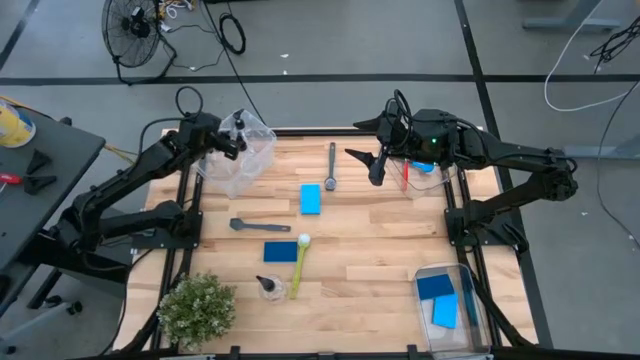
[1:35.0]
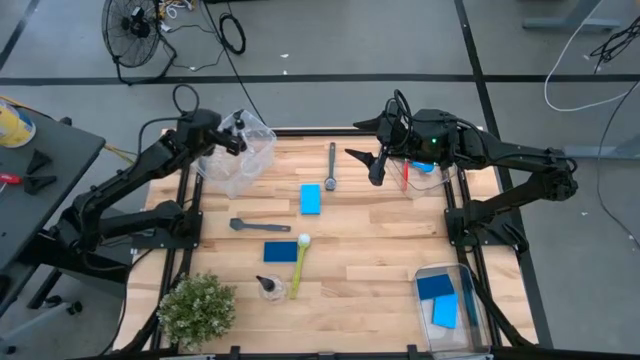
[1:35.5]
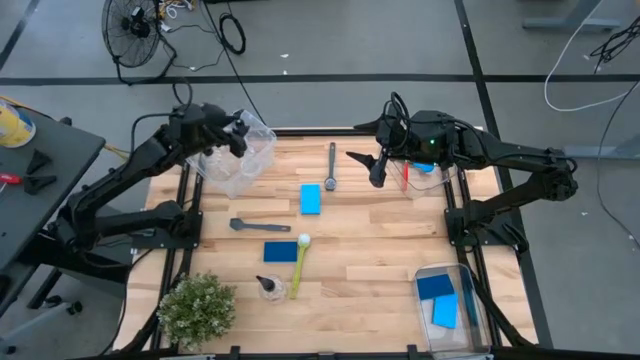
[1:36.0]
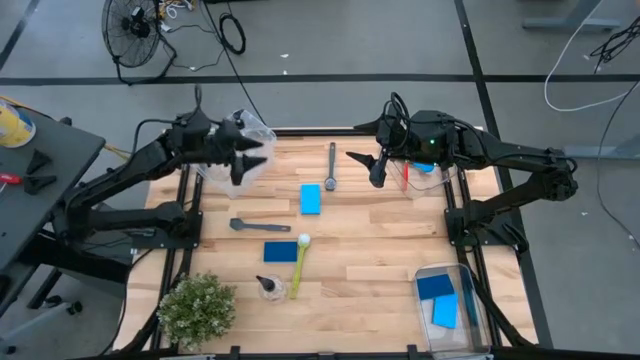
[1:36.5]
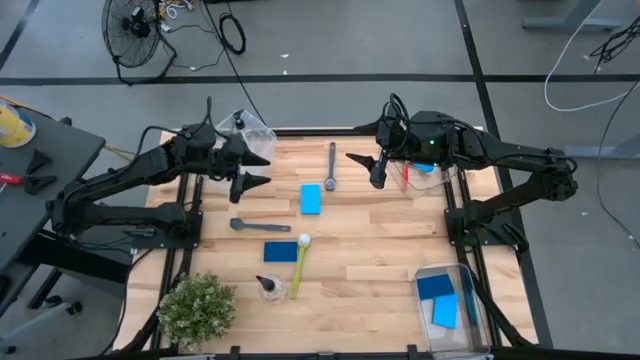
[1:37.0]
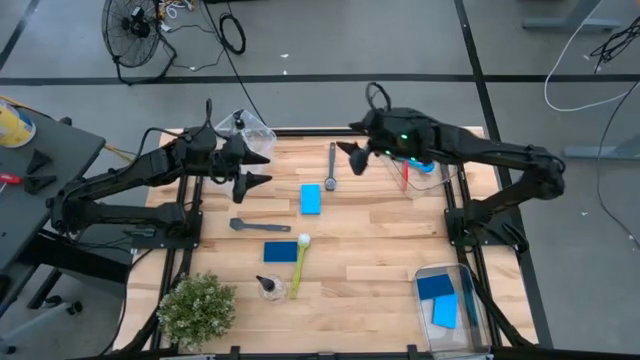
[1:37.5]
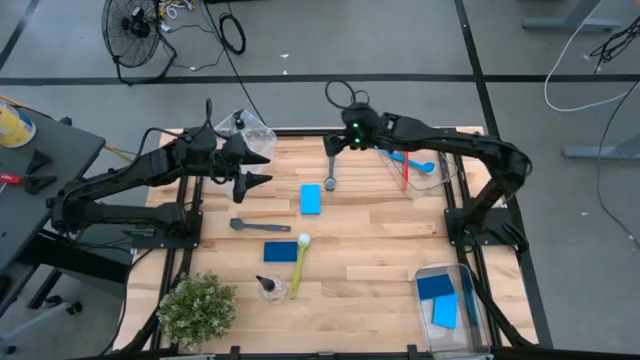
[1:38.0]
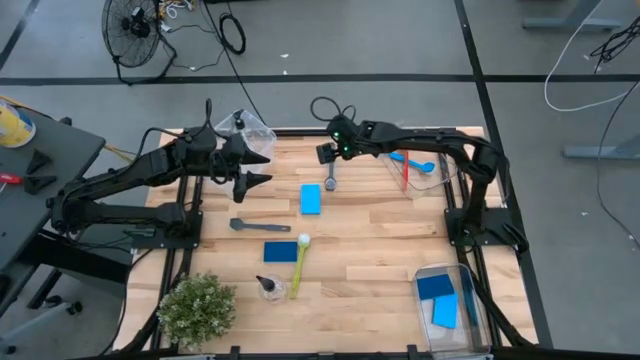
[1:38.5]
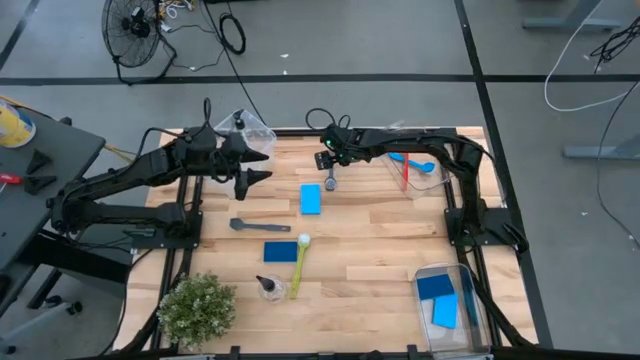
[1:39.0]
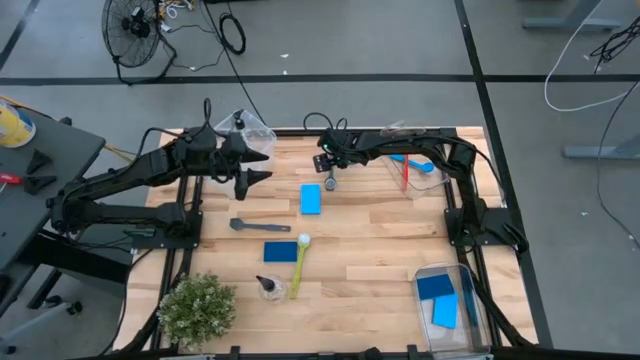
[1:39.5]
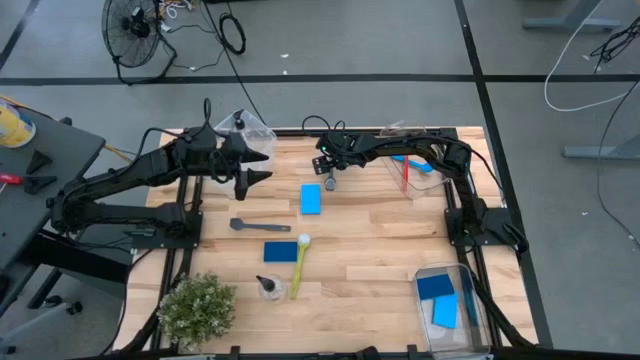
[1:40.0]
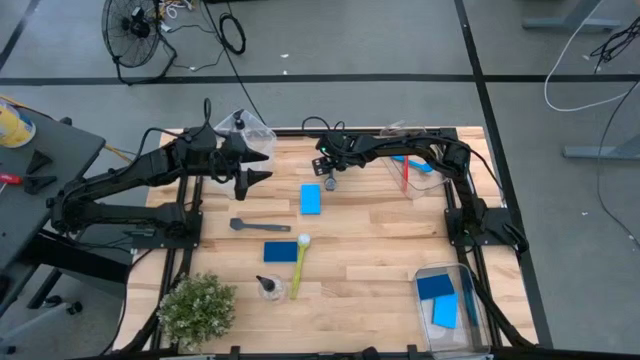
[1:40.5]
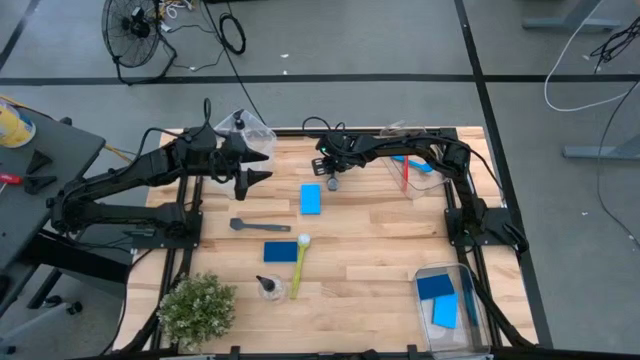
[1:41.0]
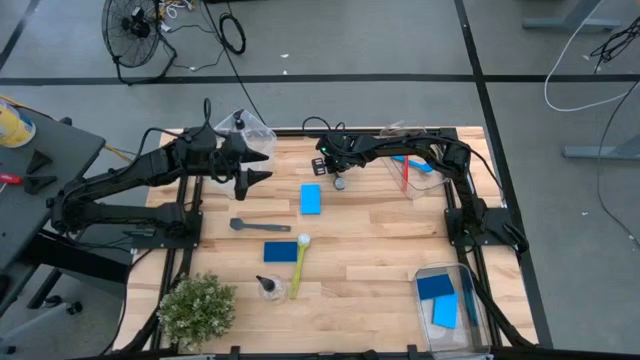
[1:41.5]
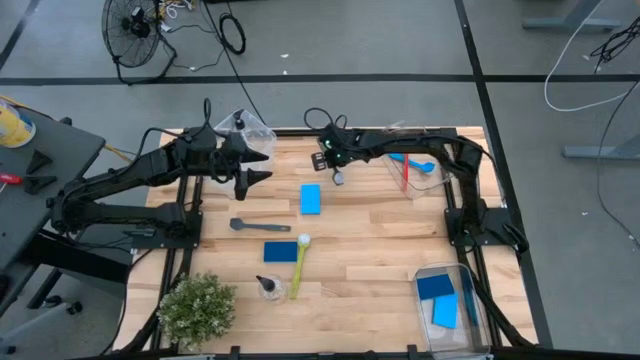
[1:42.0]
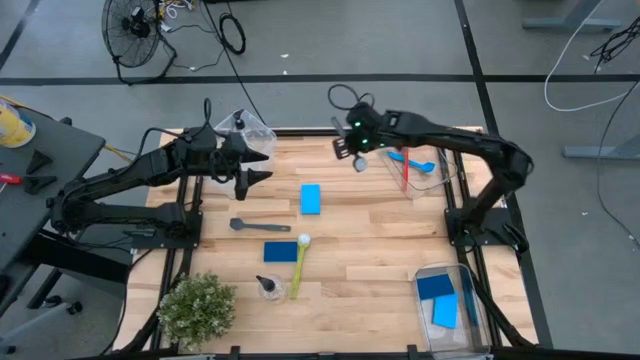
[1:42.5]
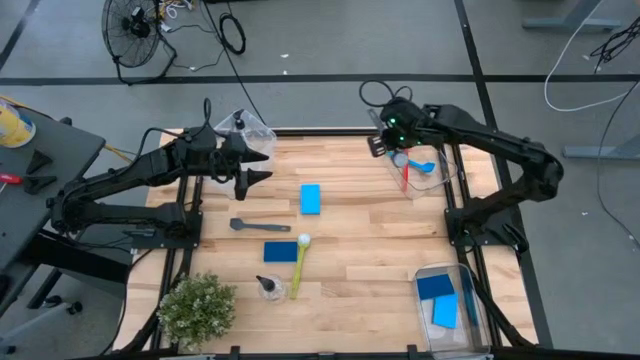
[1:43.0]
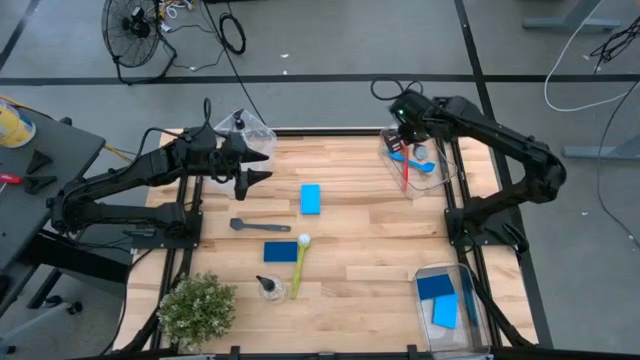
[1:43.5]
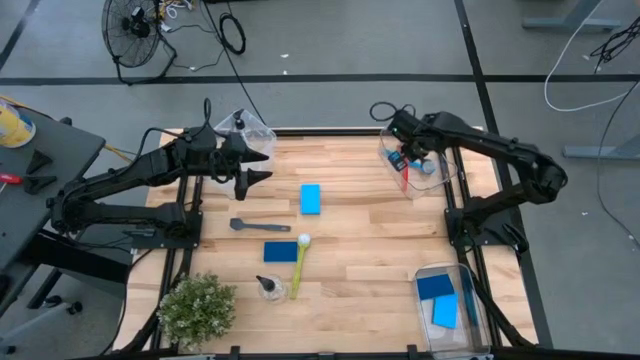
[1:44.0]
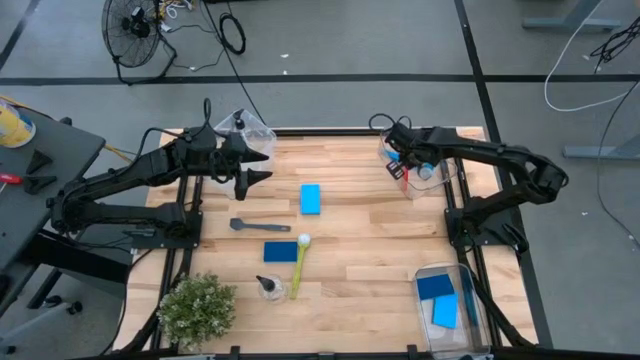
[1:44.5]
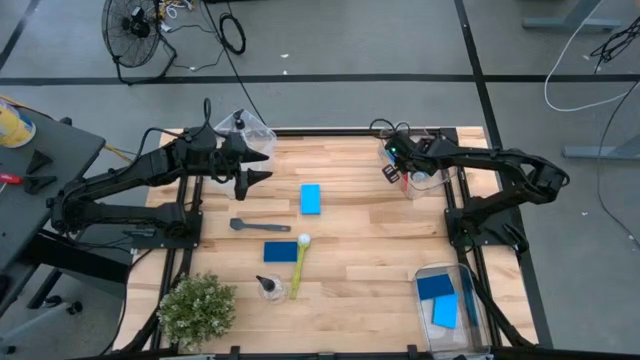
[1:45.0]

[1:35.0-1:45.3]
Task: Pick & Place Kitchen Sink Supplies
Put the gray cleaning brush into the top transparent bin

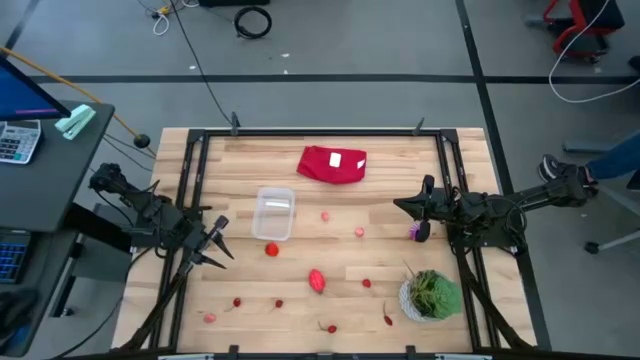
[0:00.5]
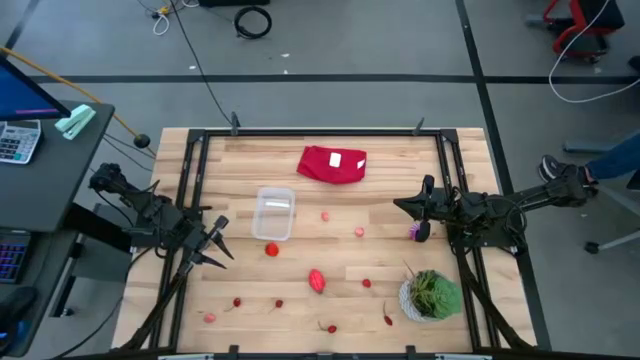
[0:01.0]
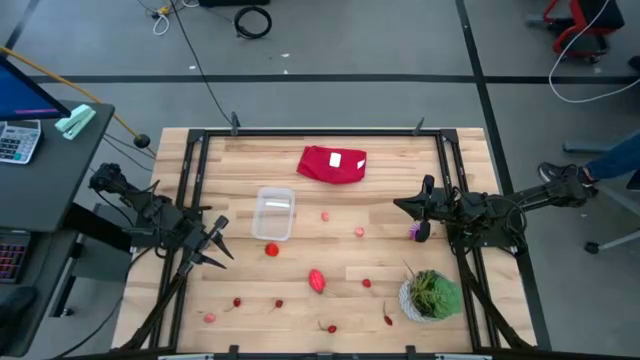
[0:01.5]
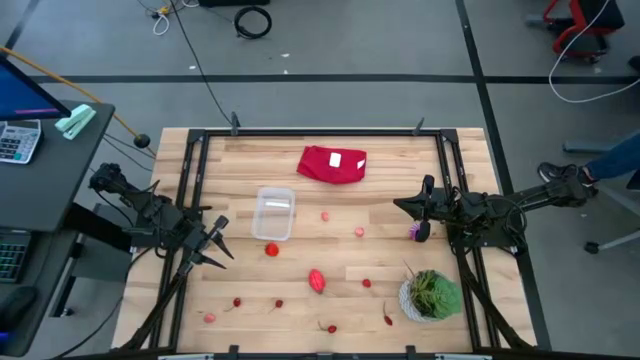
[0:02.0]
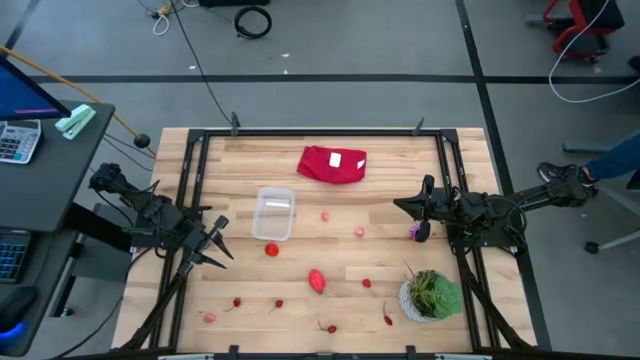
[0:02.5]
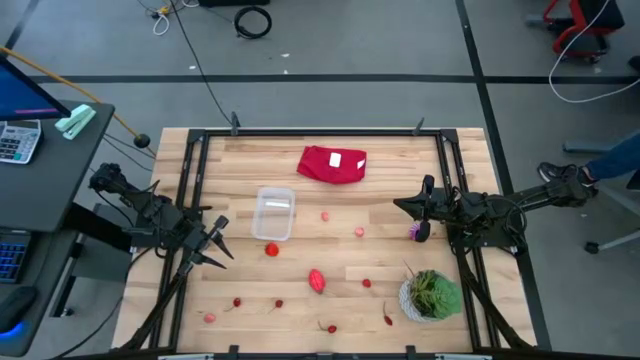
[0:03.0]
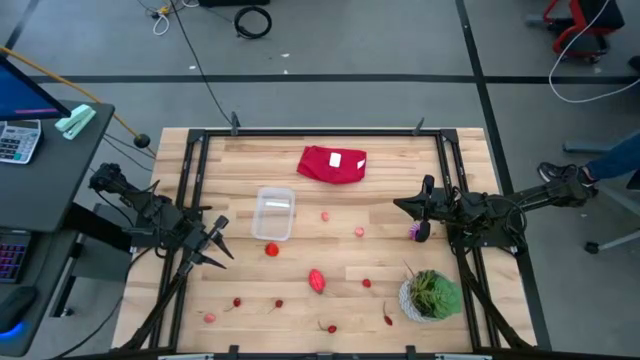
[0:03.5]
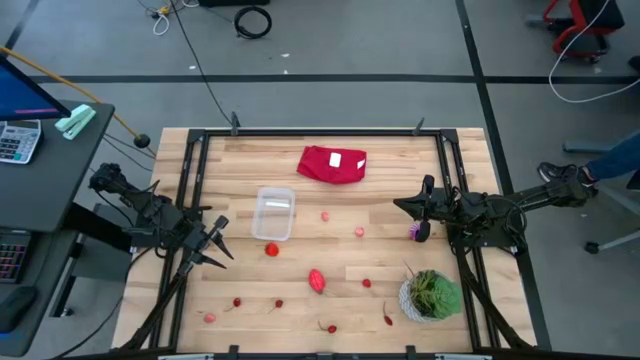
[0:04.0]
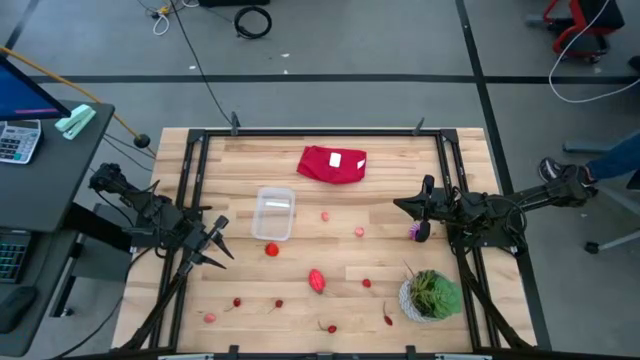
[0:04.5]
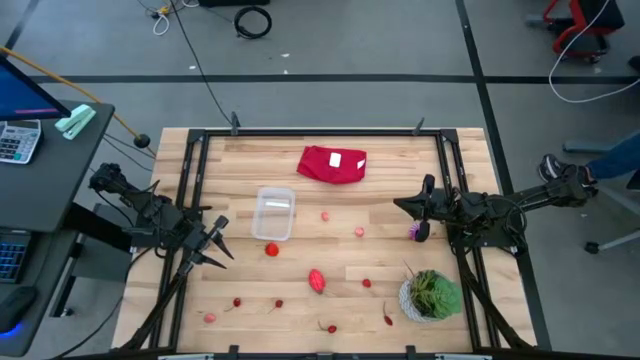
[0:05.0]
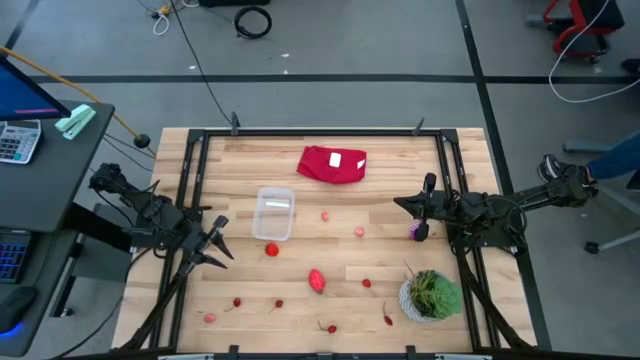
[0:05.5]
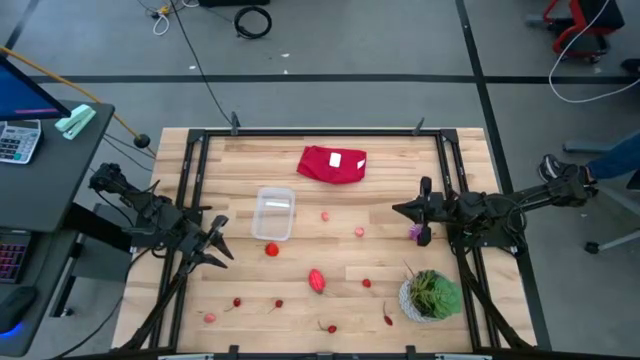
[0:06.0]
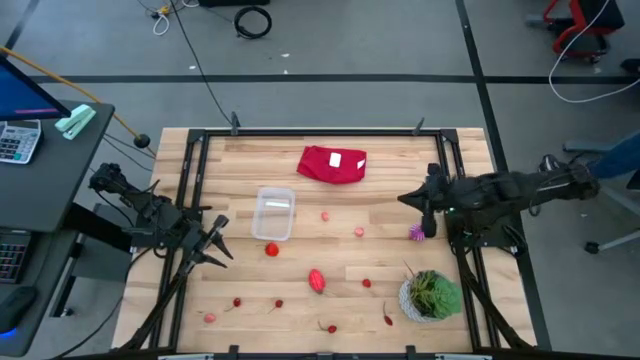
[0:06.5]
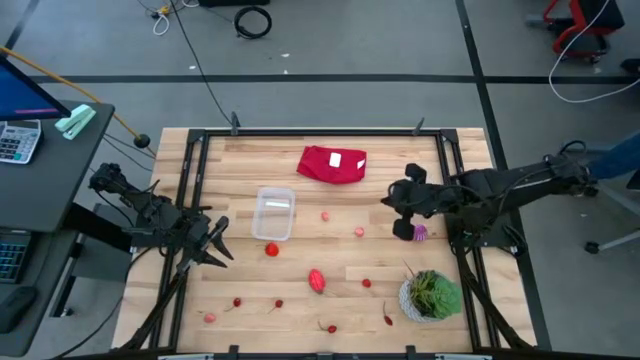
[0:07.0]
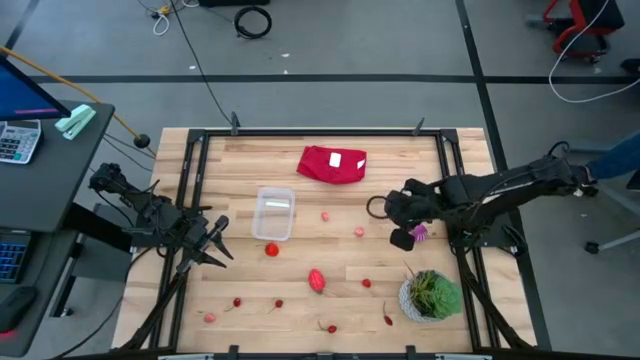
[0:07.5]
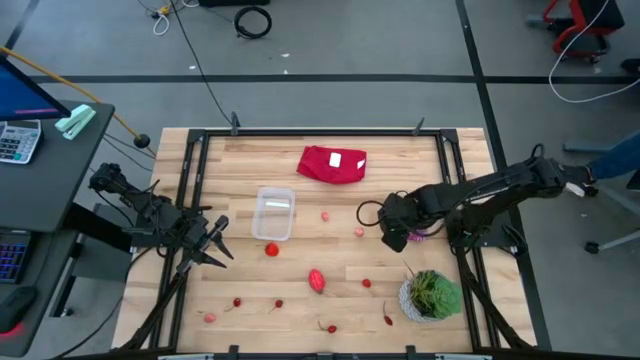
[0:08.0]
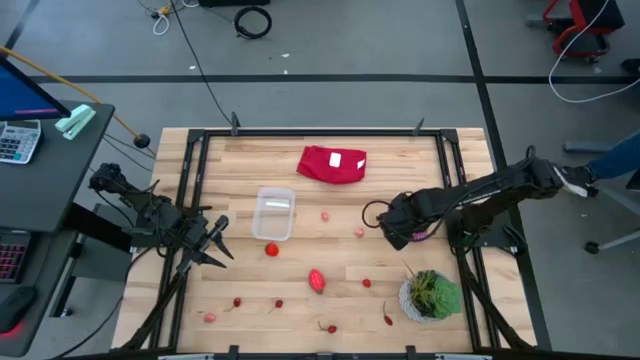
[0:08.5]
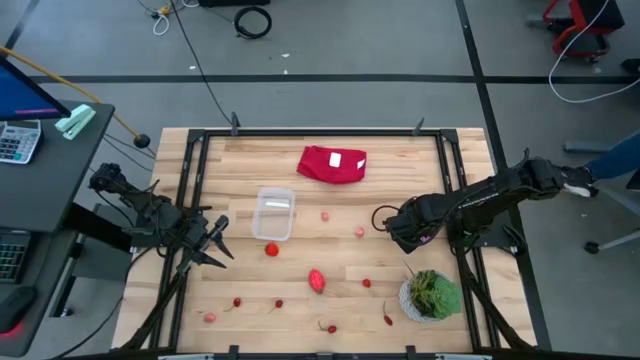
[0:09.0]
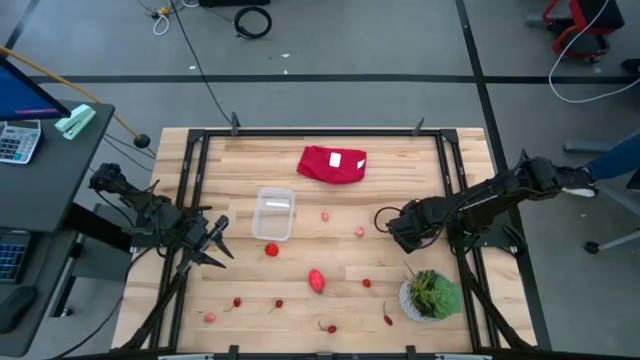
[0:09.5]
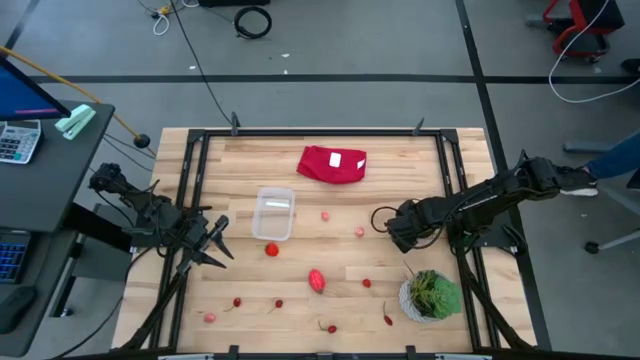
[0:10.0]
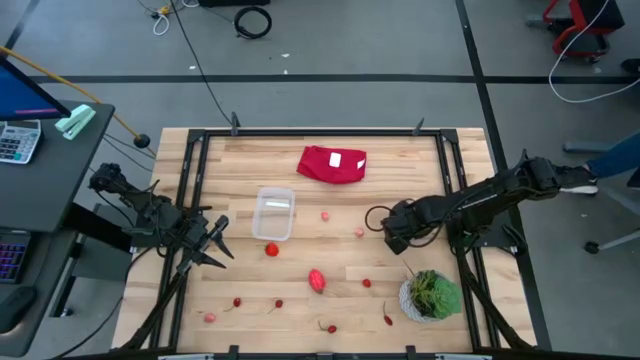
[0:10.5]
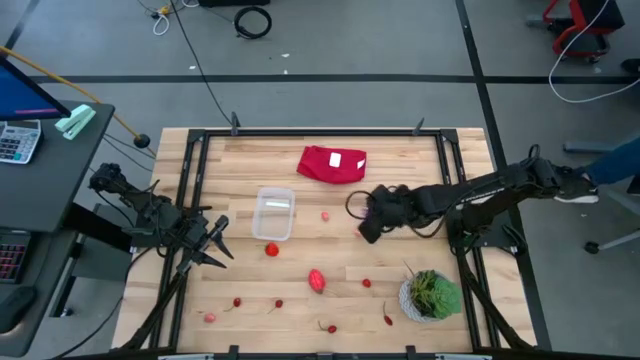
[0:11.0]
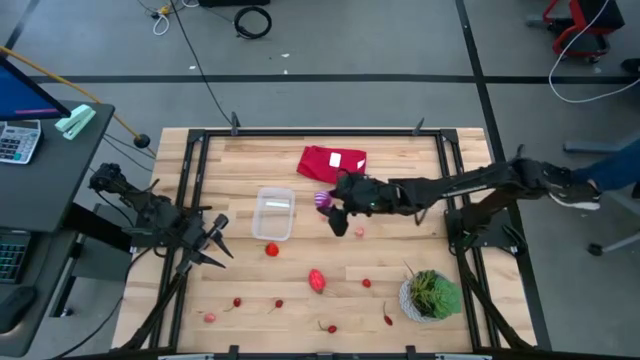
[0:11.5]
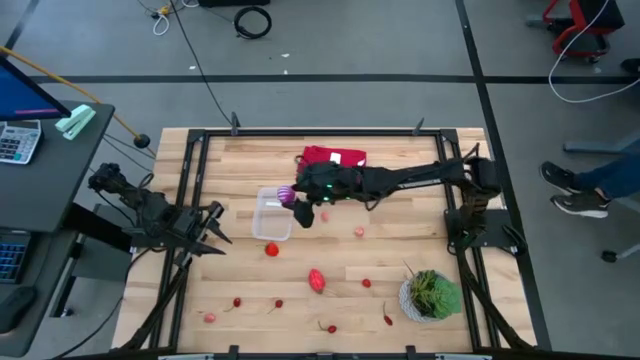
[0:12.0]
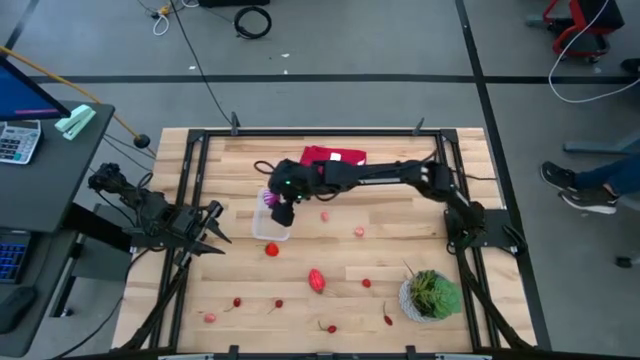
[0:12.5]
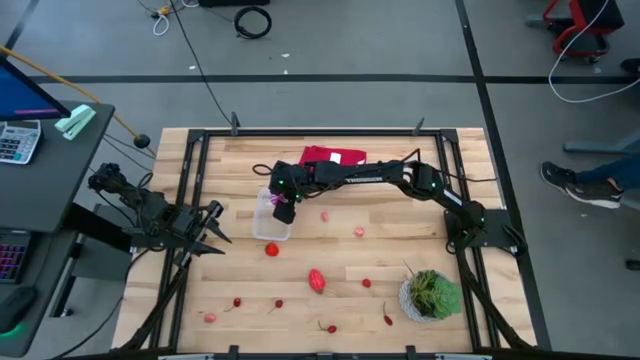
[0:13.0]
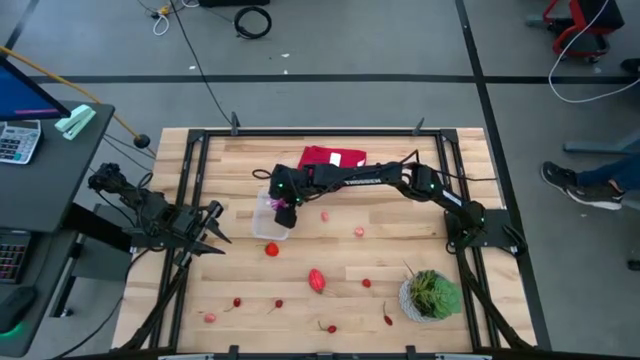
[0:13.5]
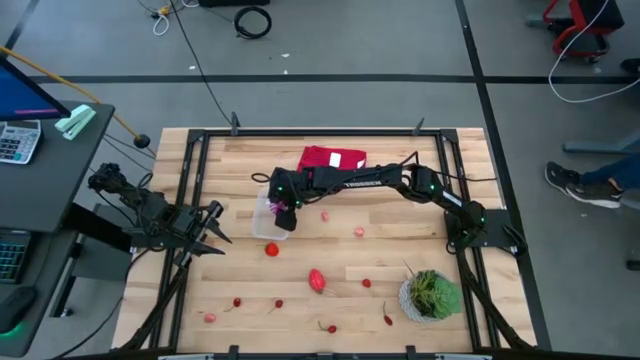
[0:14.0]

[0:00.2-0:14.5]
Task: Pick and placing Produce into tupperware
Put the purple onion in the transparent bin
